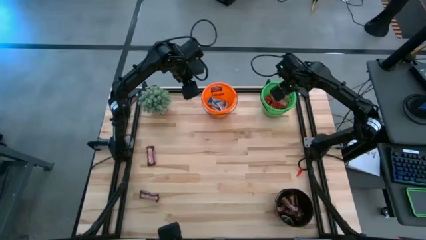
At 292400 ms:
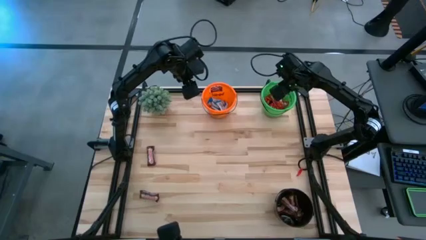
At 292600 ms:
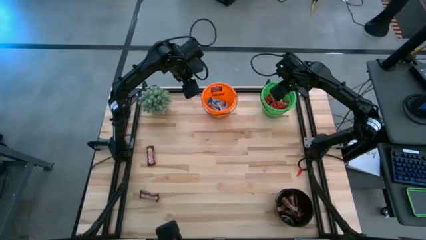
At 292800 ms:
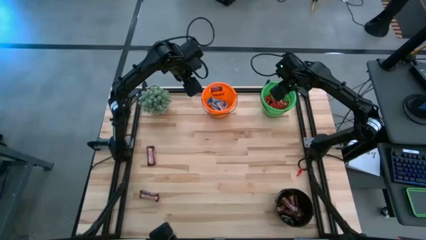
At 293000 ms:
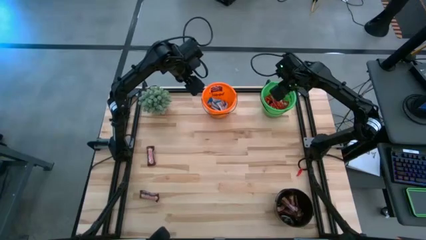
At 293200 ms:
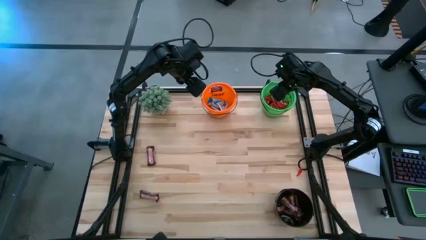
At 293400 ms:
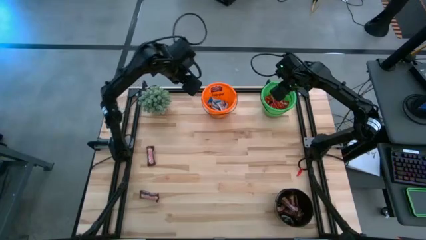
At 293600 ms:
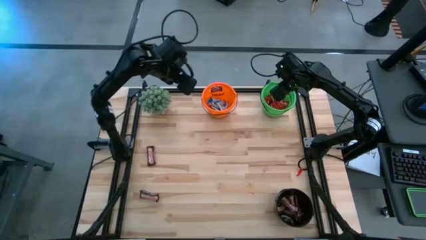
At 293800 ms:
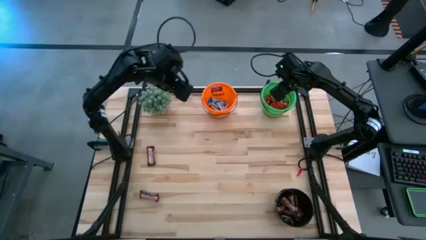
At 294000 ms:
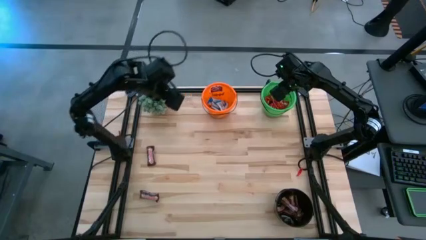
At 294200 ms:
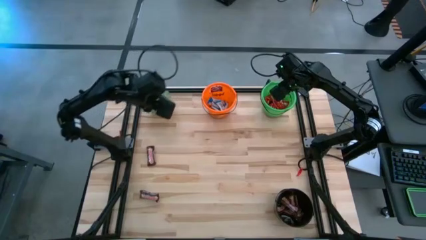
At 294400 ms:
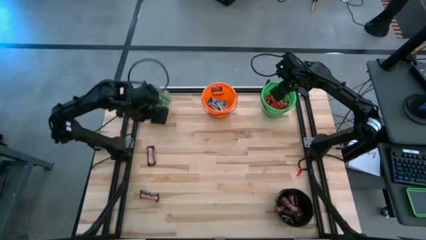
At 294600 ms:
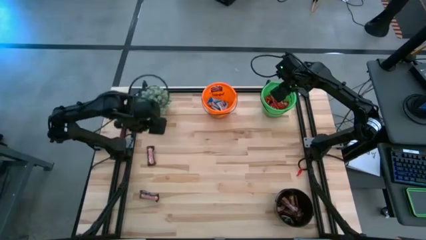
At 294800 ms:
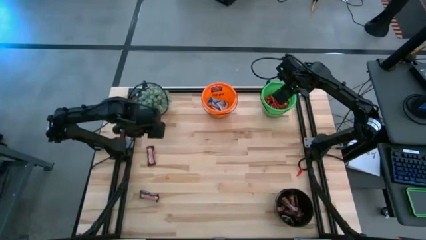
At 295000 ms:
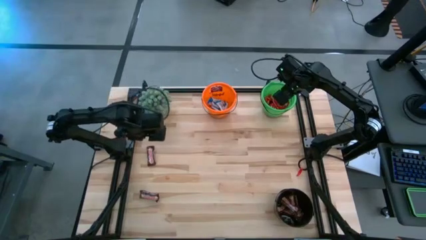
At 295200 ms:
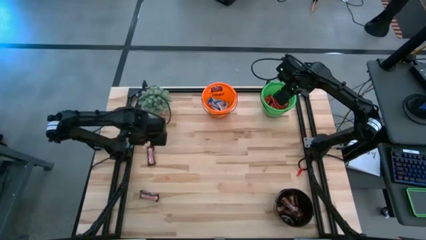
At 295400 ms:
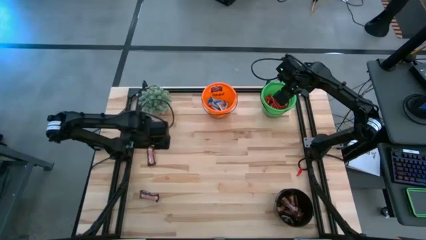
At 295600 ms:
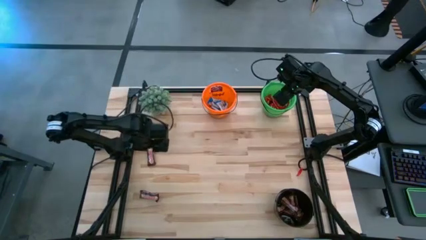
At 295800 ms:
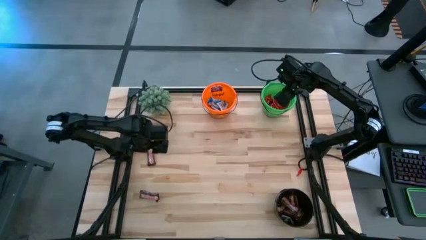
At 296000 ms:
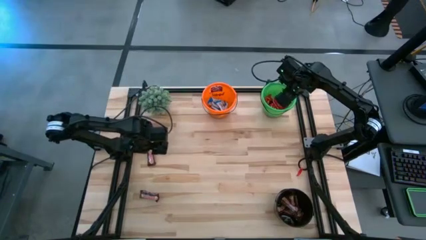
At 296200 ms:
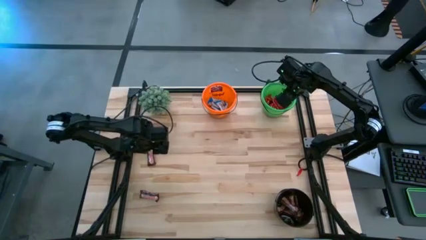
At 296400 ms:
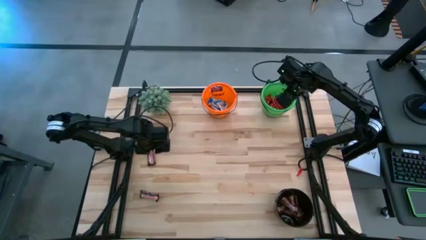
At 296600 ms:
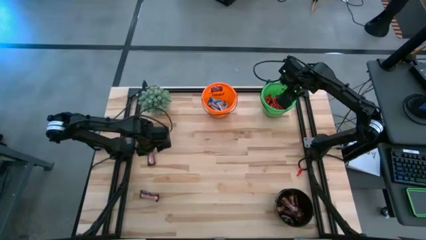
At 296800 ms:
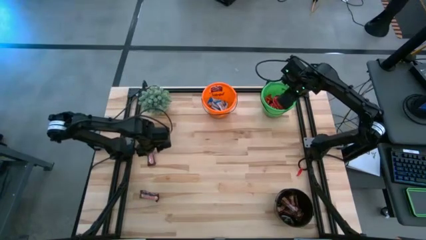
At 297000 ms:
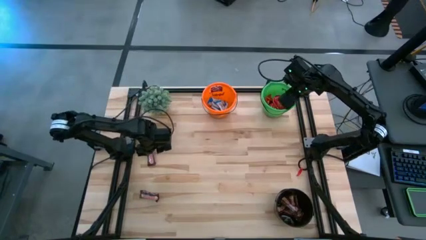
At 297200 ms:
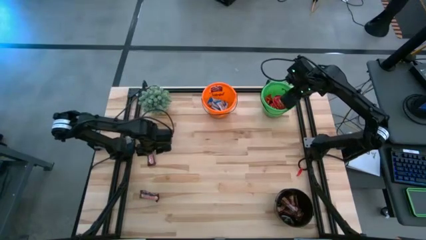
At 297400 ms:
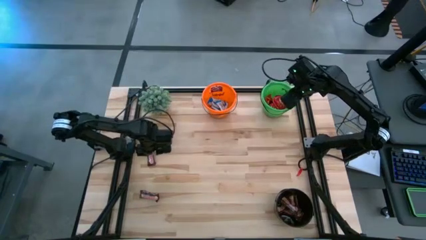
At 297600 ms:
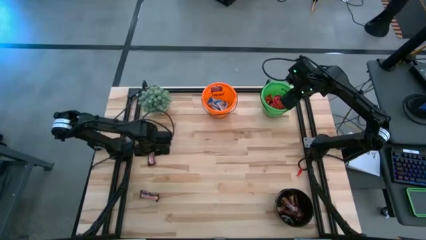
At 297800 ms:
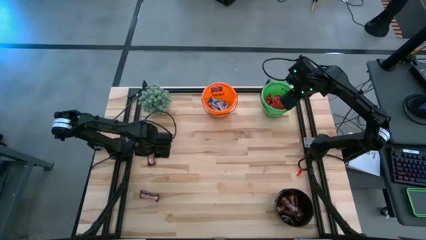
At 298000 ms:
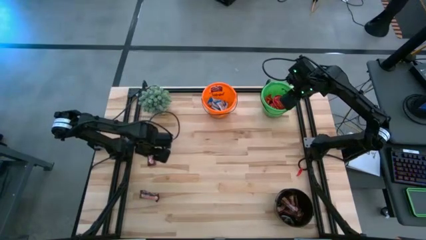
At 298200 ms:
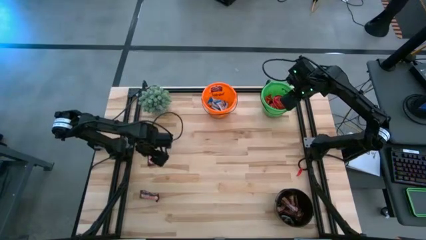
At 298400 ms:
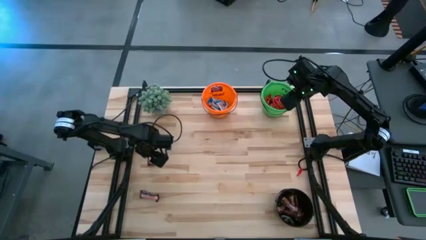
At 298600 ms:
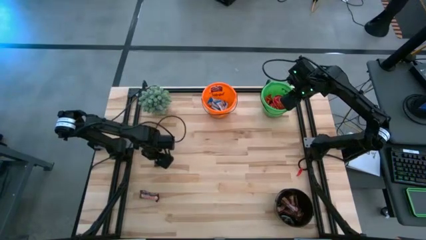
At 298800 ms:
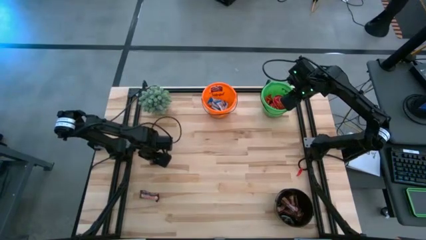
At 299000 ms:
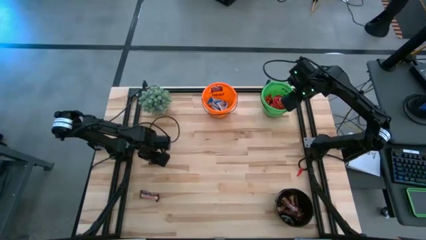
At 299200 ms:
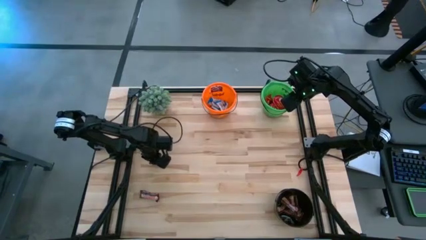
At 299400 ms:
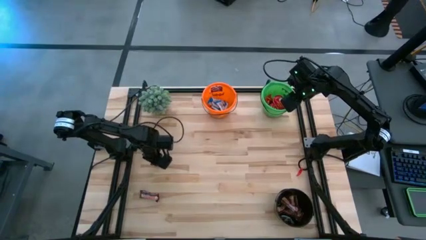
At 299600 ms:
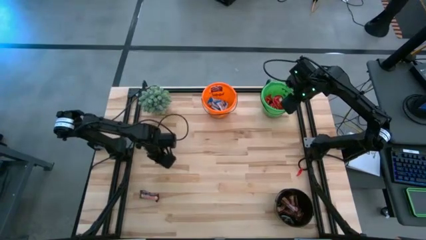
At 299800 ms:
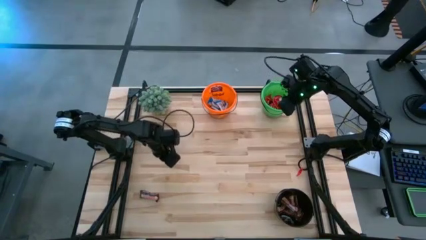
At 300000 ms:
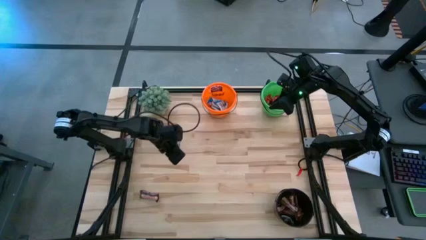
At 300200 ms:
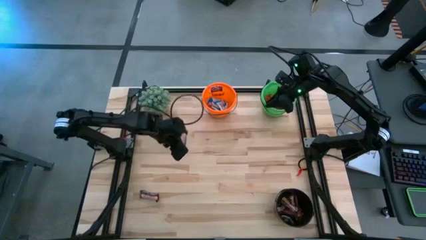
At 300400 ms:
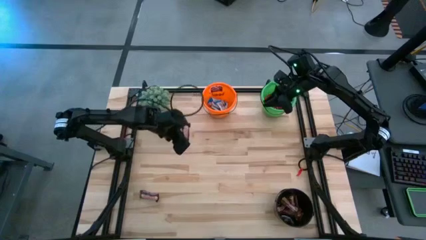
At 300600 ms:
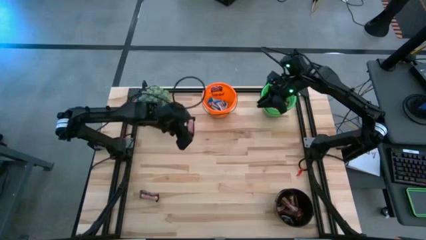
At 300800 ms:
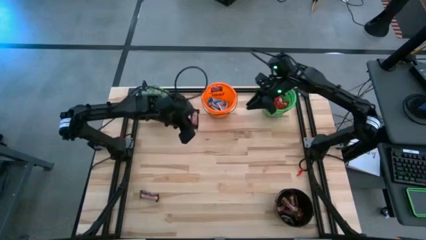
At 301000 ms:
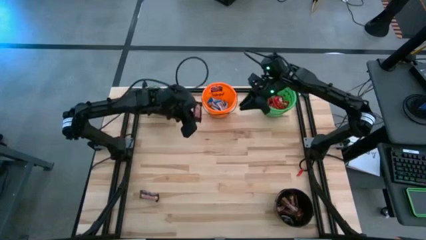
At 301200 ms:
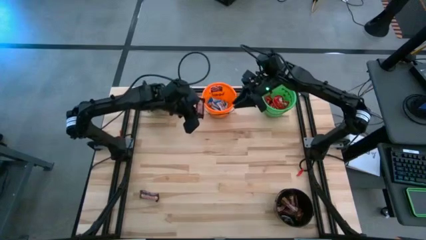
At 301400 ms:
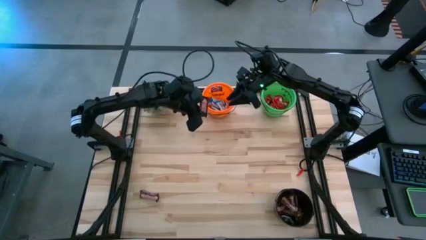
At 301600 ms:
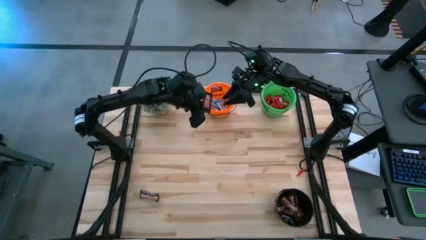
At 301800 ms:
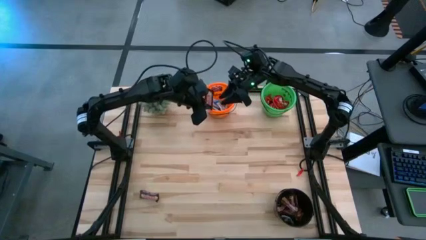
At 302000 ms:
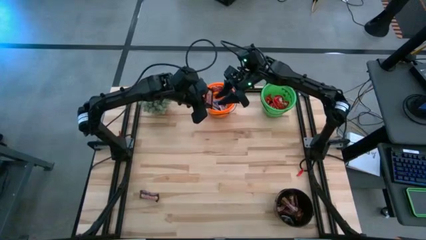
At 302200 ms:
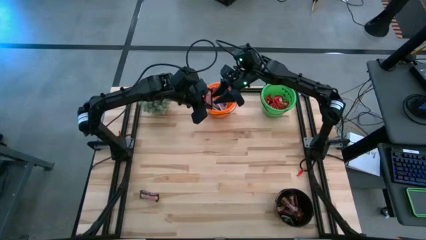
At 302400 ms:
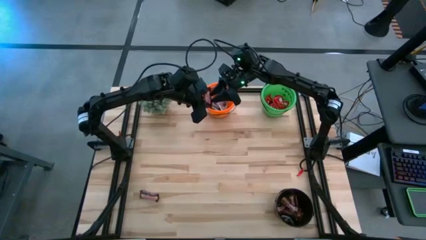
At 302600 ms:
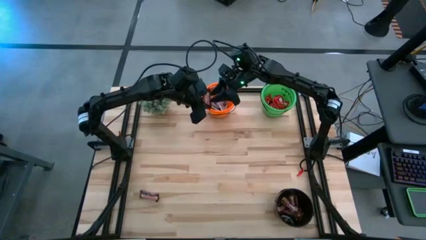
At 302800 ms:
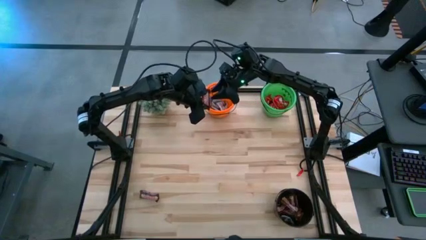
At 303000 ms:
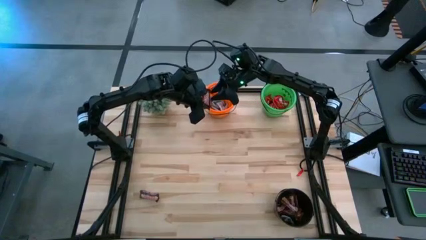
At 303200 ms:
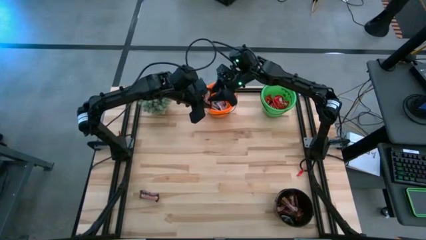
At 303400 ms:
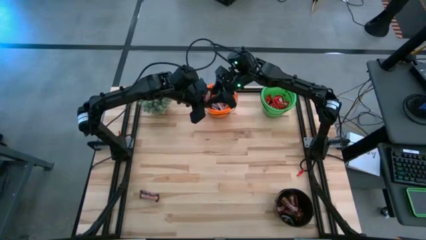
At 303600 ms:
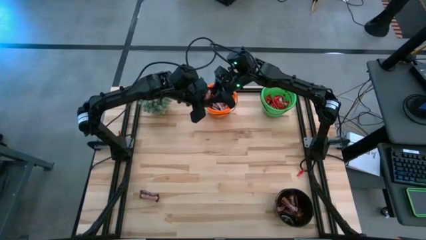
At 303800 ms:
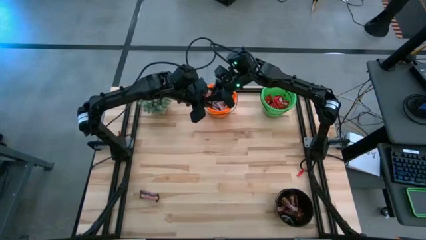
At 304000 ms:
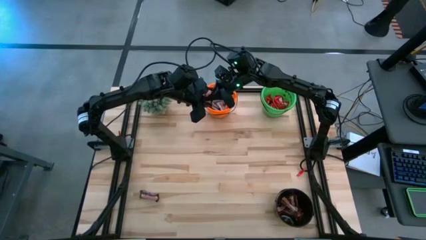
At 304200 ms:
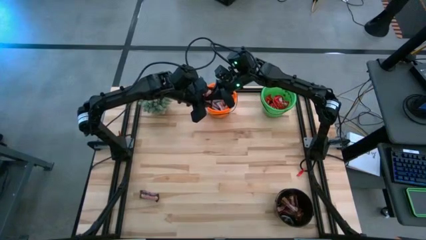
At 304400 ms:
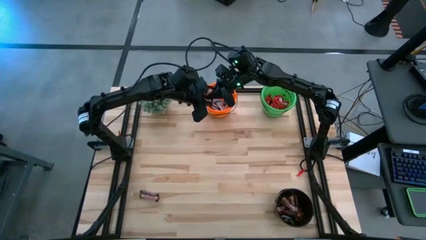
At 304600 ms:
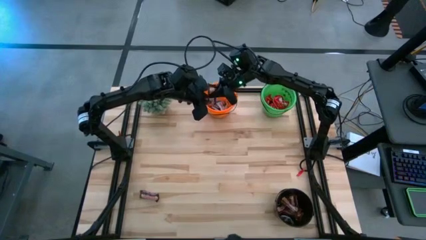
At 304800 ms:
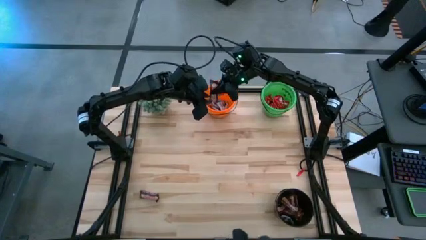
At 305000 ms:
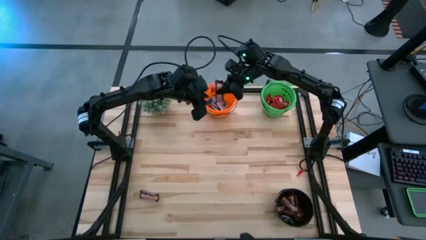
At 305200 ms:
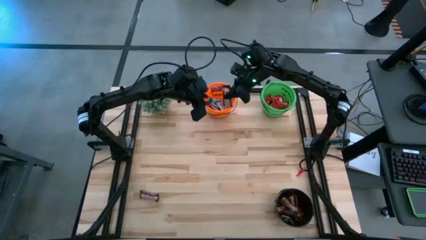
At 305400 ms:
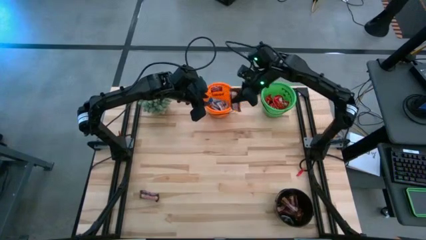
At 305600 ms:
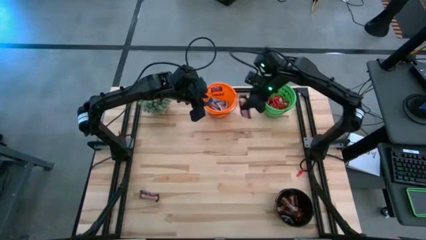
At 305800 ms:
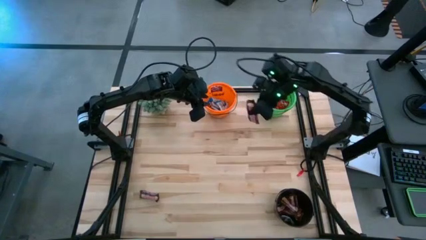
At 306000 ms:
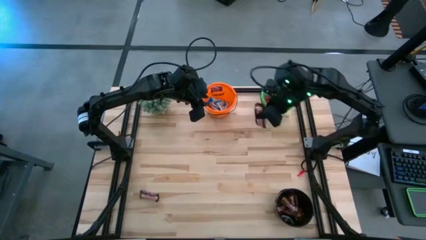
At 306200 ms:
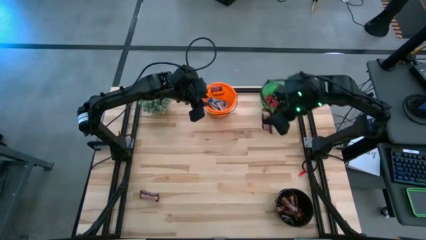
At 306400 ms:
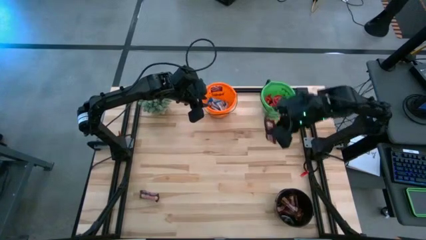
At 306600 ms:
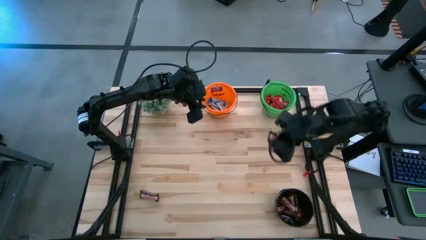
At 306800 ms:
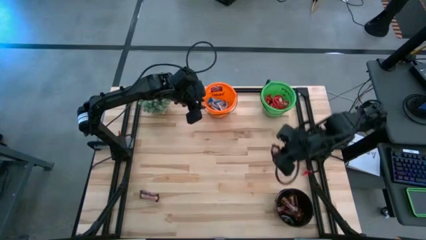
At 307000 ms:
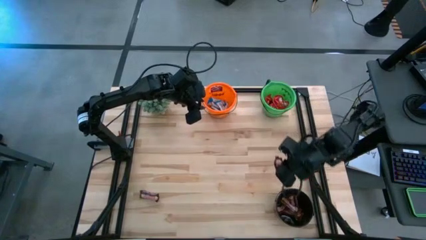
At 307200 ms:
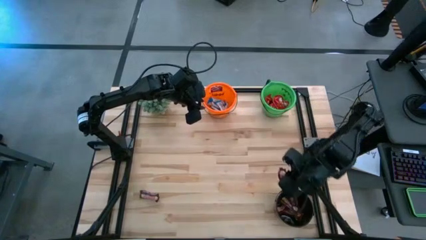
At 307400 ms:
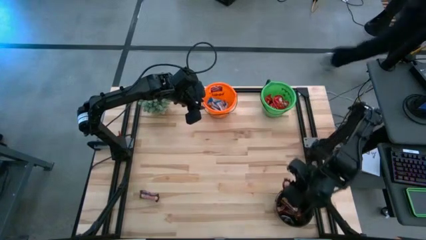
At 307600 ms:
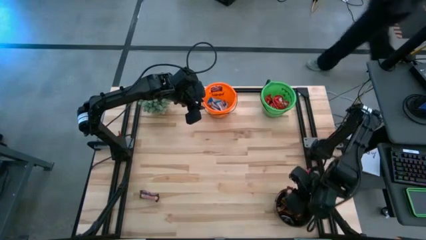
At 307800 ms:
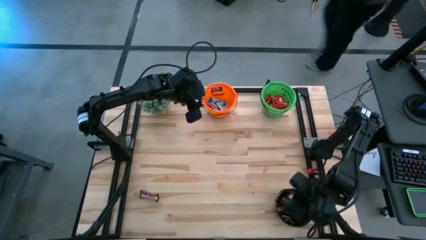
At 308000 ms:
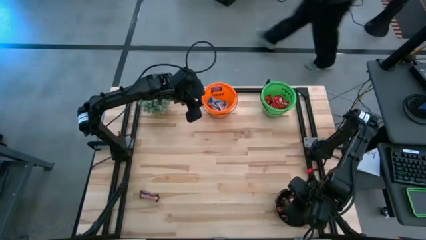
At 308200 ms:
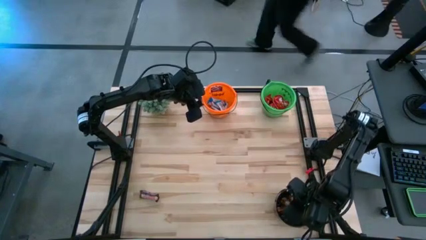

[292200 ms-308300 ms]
Task: Organize candy in baskets
Put the brown chocolate bar into the black bucket
